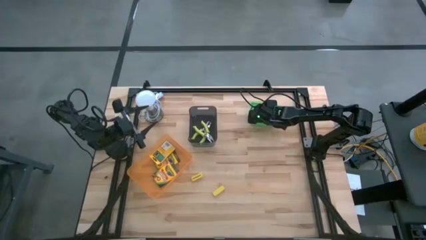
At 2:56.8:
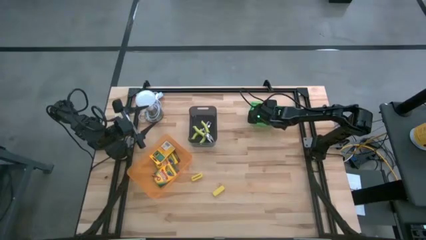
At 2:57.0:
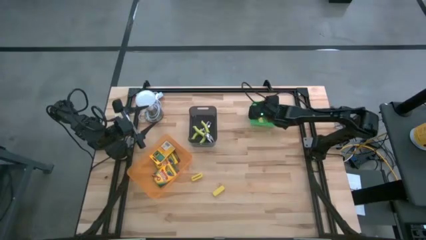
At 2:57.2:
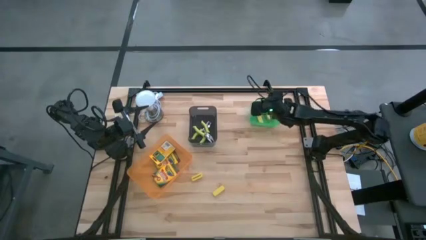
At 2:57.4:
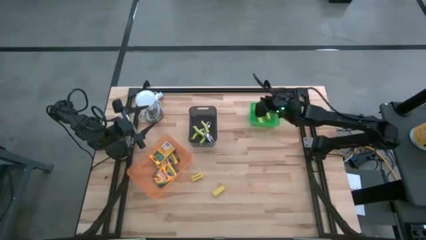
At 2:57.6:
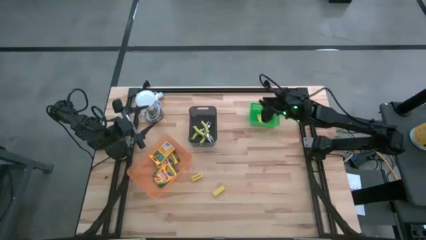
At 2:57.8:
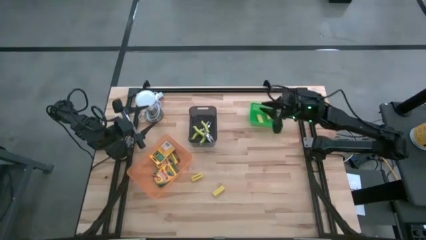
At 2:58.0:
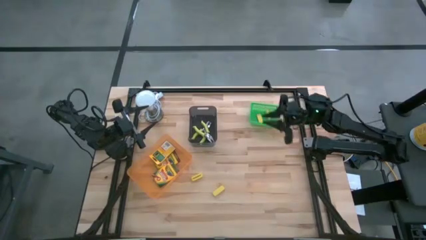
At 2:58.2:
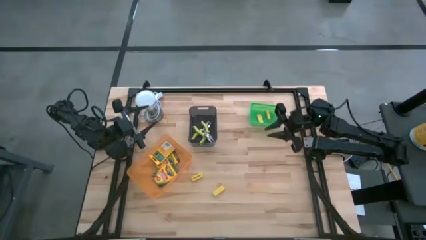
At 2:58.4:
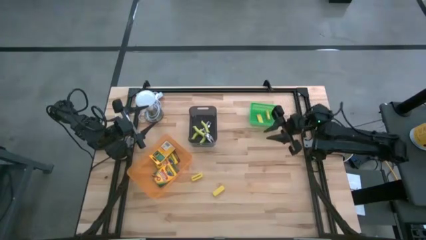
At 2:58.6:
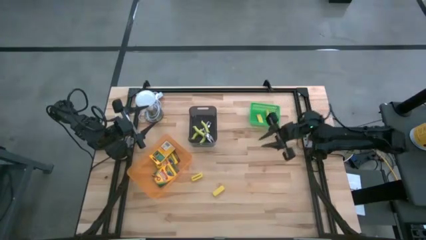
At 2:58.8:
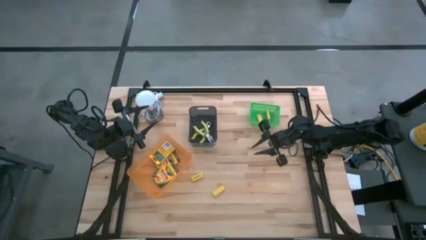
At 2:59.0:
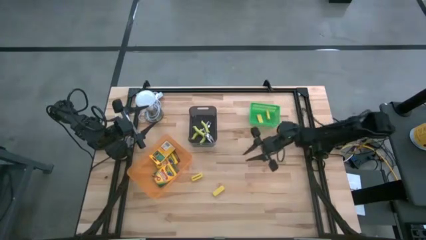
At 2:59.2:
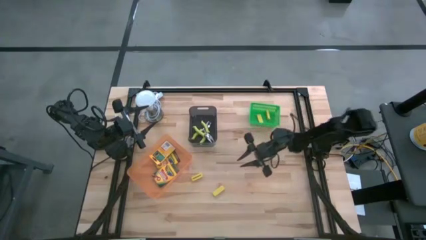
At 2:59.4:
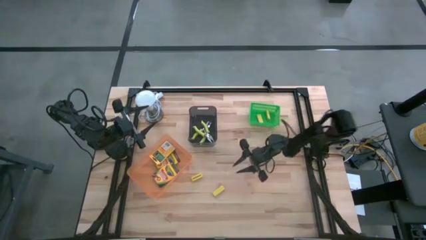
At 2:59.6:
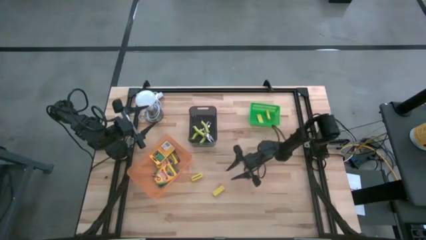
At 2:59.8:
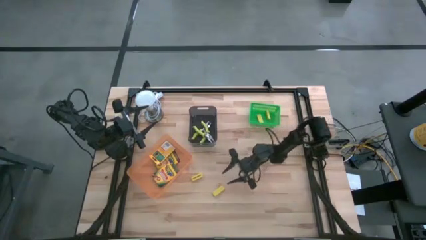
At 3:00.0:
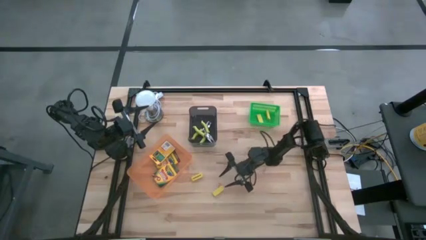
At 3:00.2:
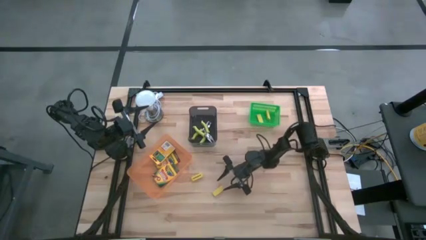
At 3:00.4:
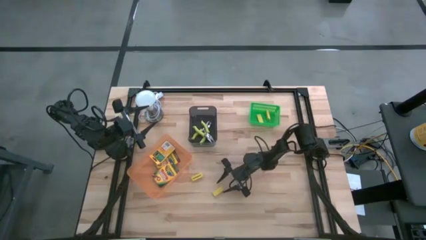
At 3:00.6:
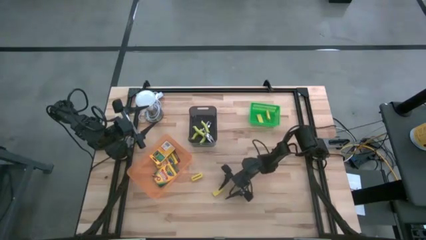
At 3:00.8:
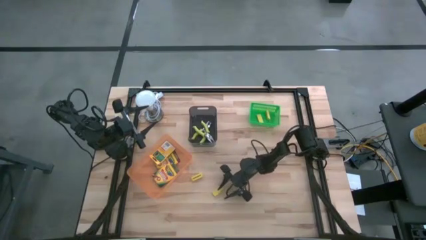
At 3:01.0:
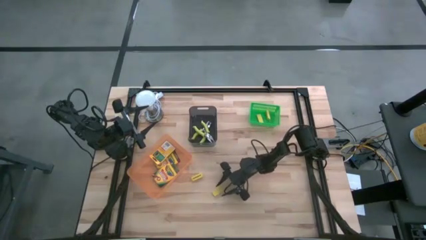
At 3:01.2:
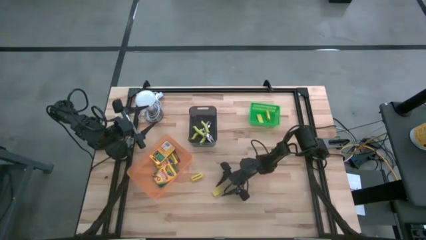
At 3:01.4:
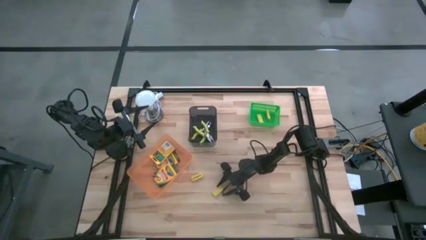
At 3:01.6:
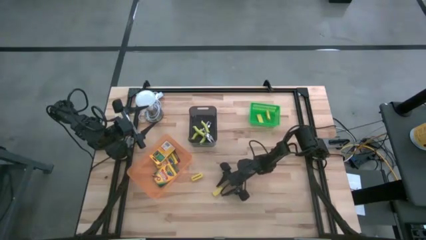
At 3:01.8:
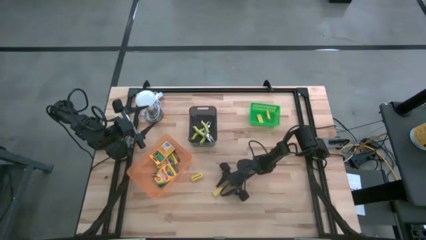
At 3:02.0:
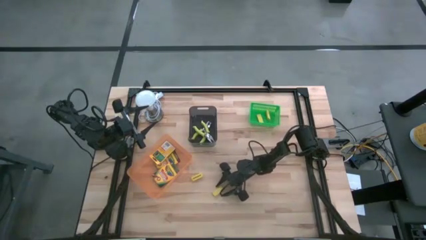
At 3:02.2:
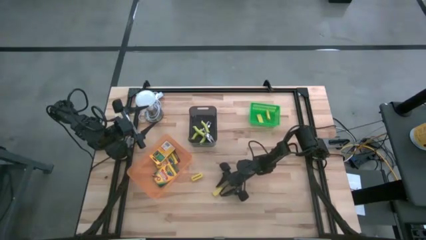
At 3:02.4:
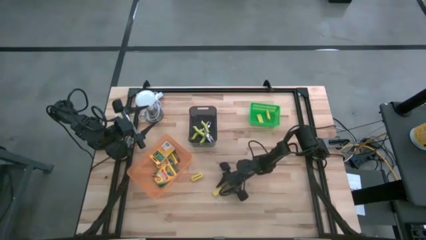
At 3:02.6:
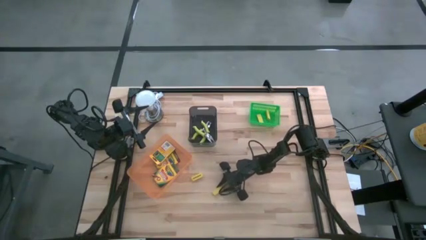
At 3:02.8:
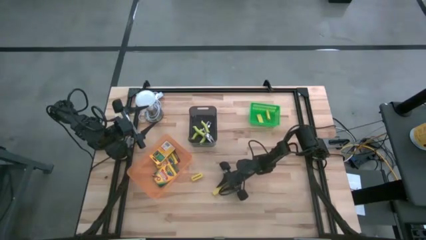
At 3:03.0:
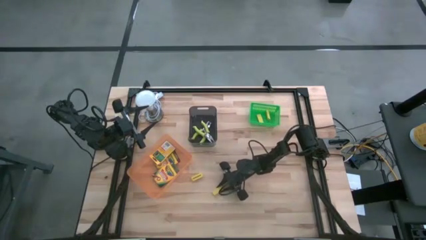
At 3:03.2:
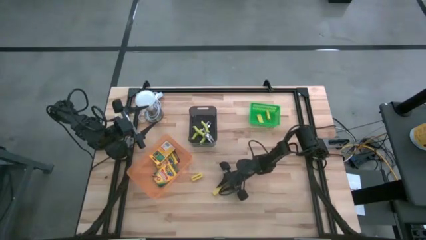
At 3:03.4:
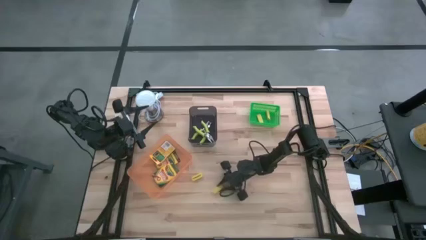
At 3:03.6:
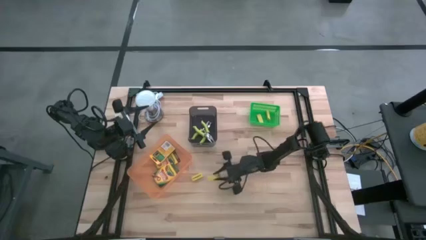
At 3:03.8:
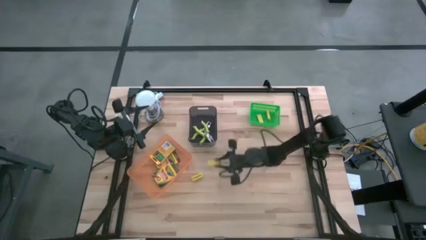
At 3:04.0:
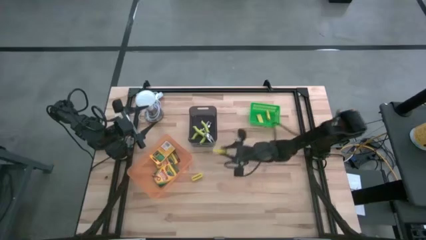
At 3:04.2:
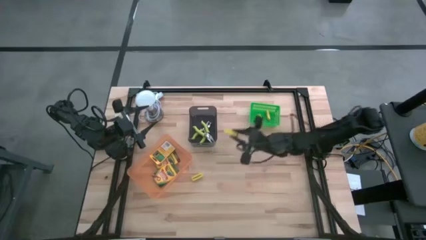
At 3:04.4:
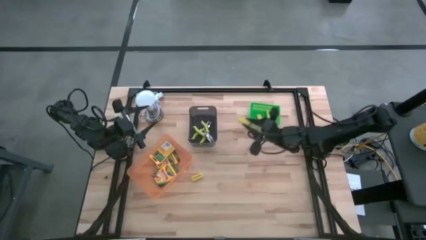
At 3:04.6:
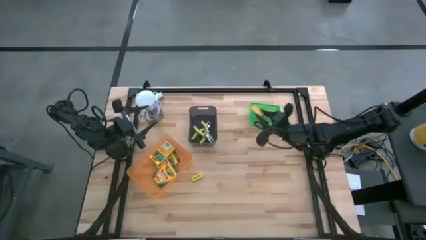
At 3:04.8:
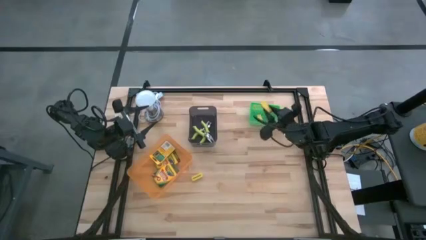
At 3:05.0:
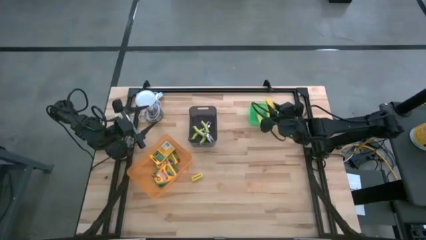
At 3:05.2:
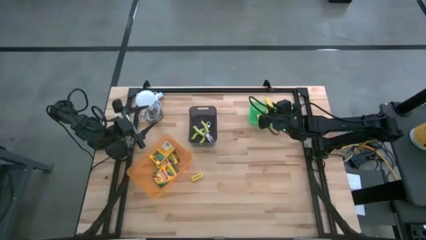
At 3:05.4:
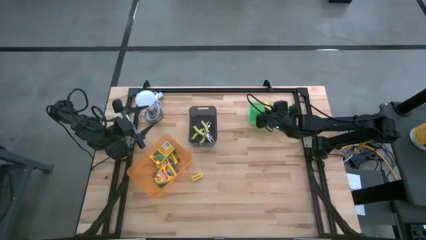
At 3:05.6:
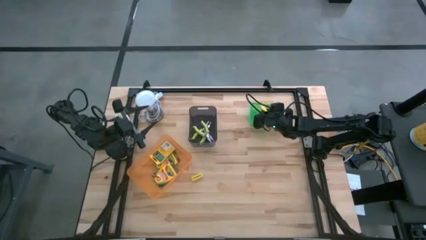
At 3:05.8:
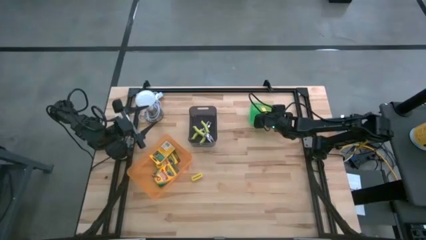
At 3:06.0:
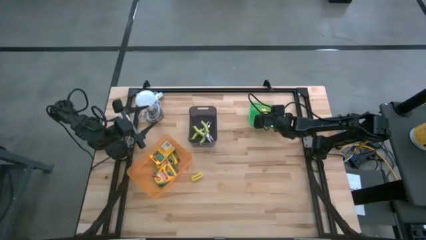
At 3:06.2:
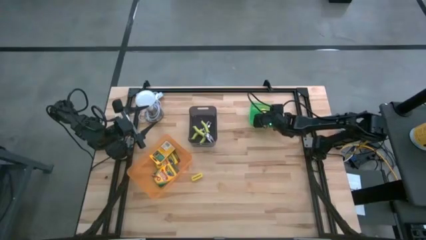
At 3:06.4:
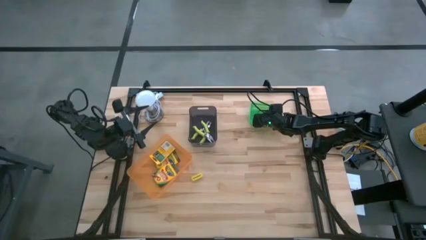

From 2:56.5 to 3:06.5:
Task: Pick & Place School Supplies
Put the yellow eraser into the green bin
